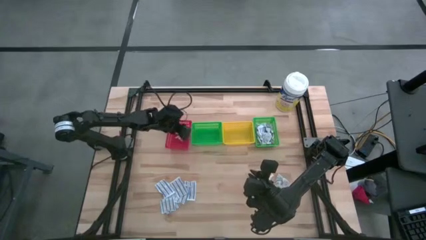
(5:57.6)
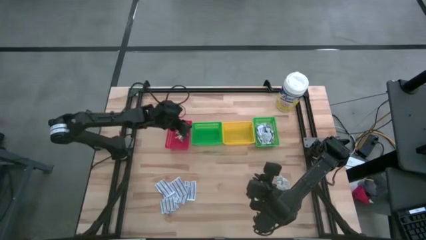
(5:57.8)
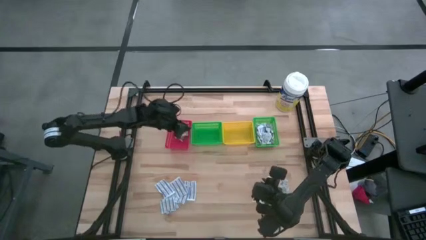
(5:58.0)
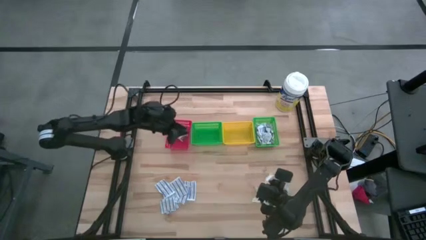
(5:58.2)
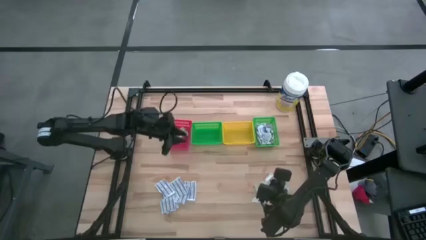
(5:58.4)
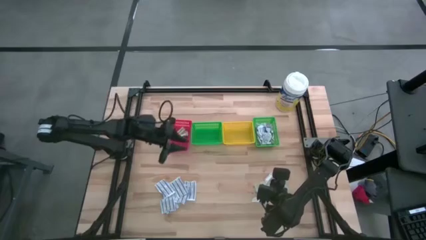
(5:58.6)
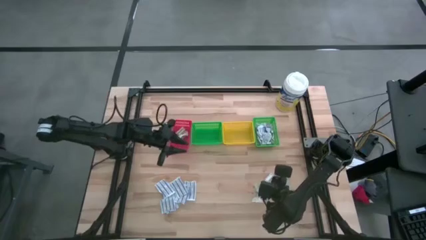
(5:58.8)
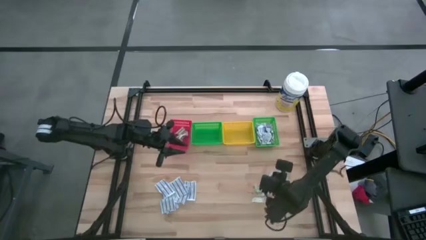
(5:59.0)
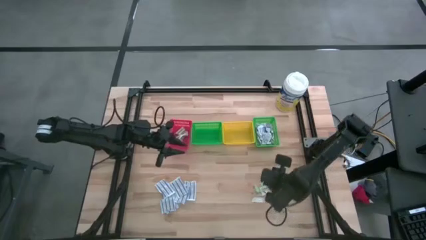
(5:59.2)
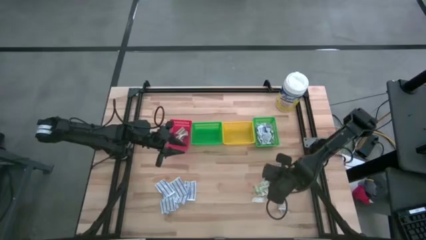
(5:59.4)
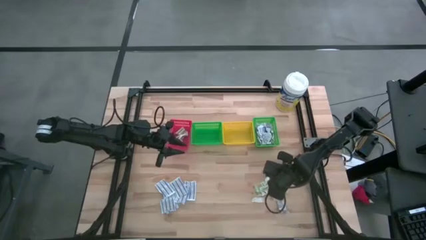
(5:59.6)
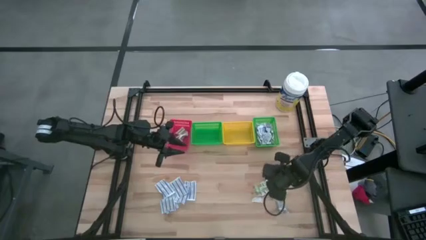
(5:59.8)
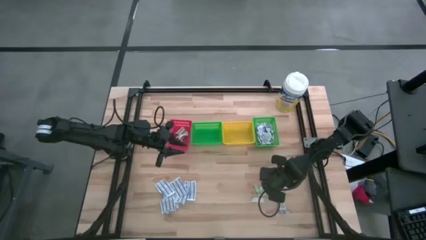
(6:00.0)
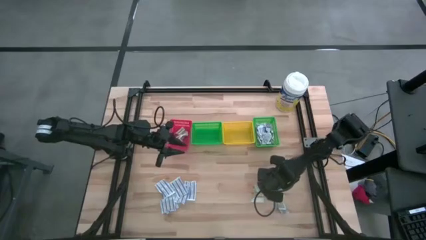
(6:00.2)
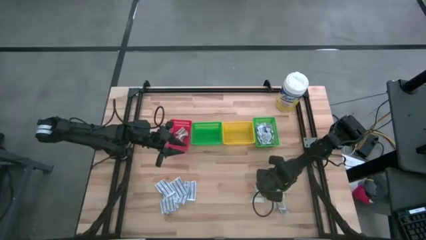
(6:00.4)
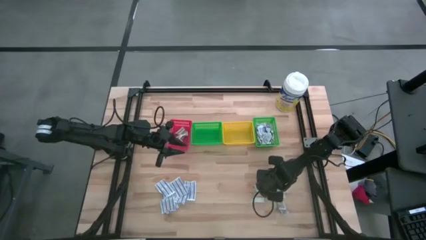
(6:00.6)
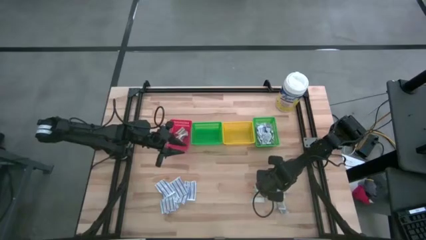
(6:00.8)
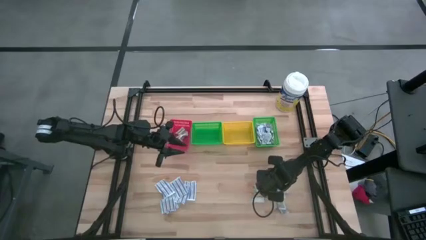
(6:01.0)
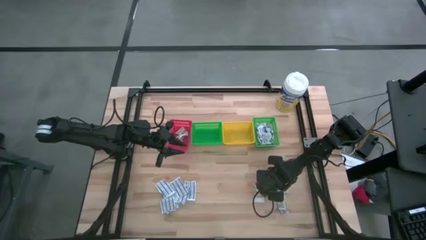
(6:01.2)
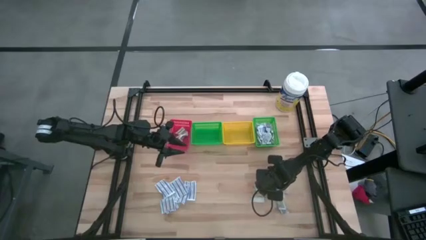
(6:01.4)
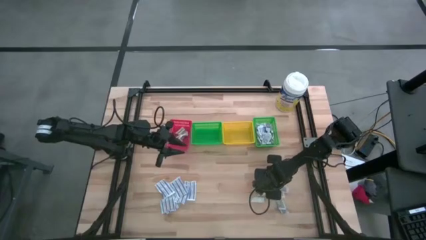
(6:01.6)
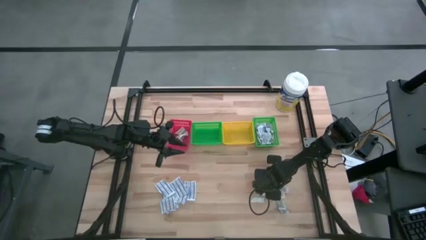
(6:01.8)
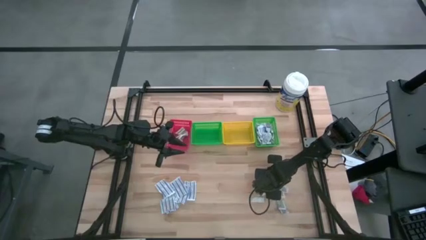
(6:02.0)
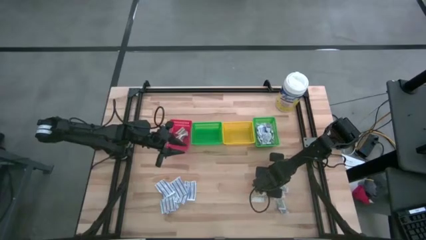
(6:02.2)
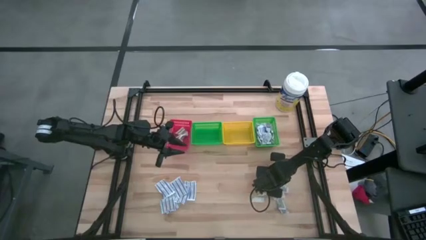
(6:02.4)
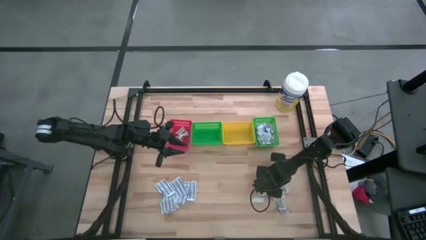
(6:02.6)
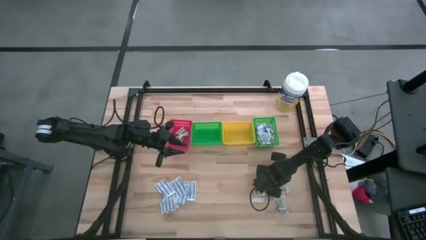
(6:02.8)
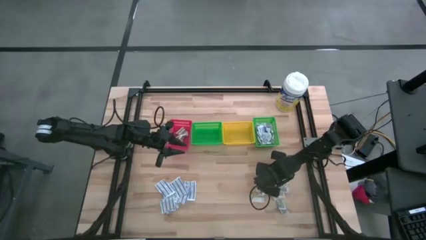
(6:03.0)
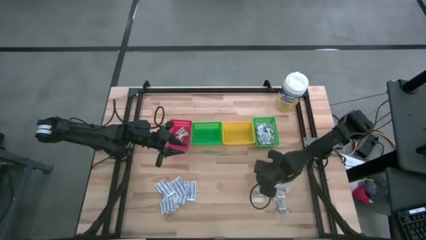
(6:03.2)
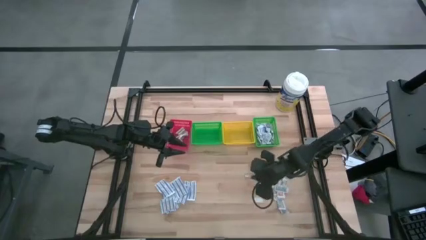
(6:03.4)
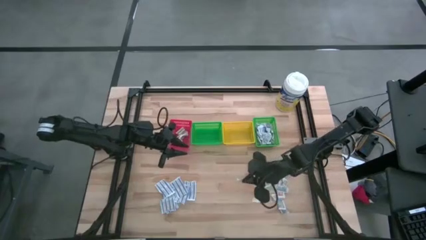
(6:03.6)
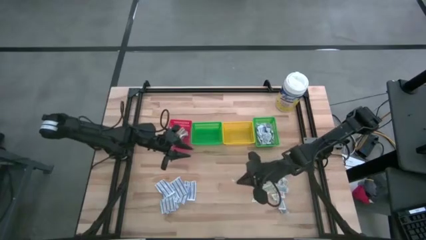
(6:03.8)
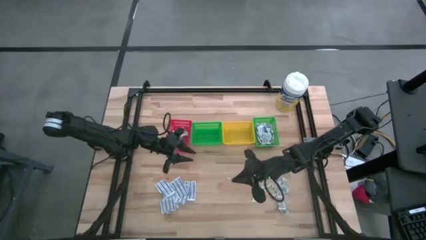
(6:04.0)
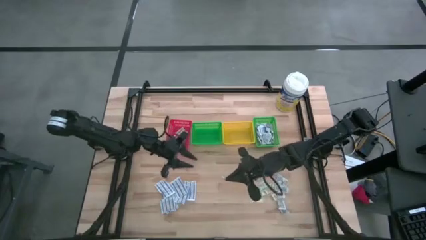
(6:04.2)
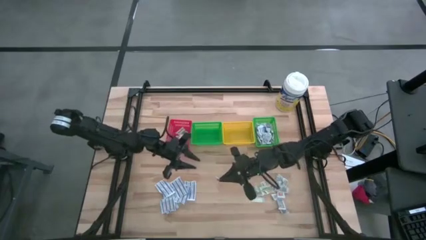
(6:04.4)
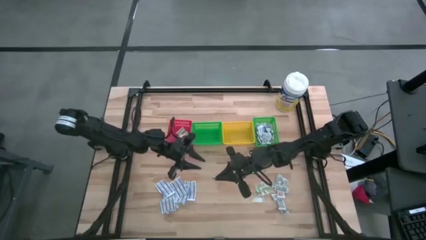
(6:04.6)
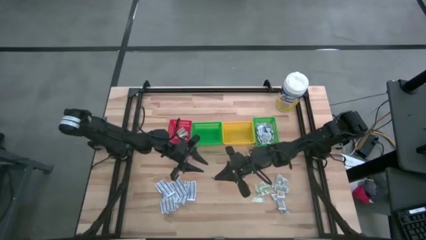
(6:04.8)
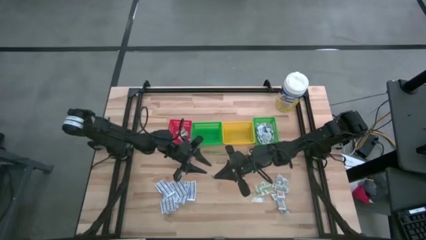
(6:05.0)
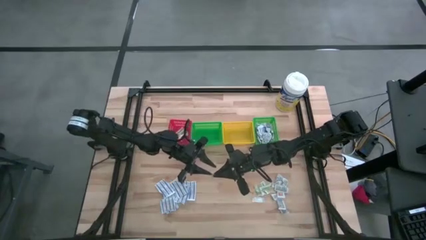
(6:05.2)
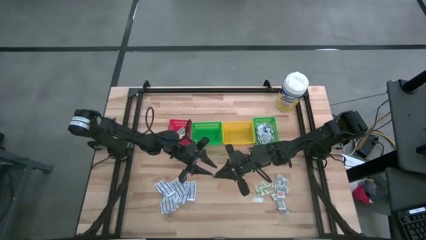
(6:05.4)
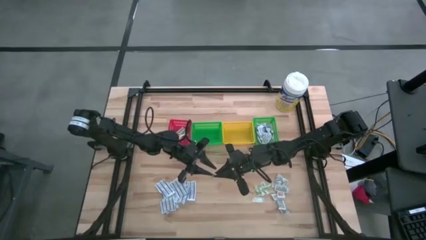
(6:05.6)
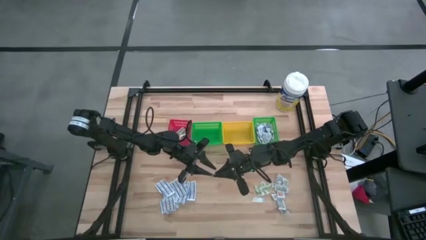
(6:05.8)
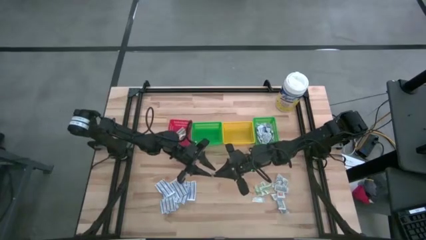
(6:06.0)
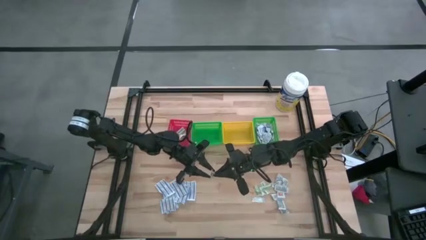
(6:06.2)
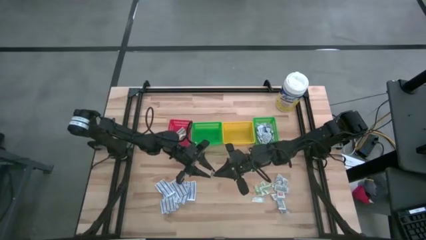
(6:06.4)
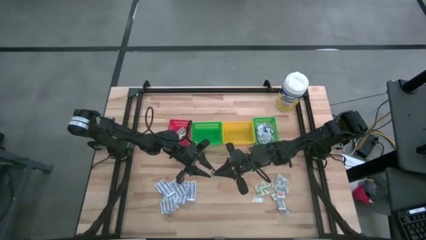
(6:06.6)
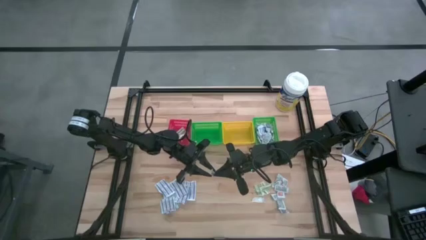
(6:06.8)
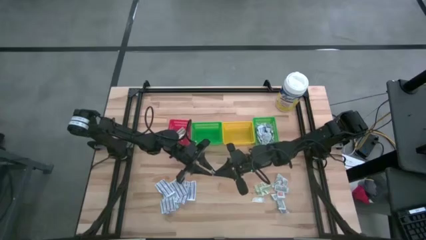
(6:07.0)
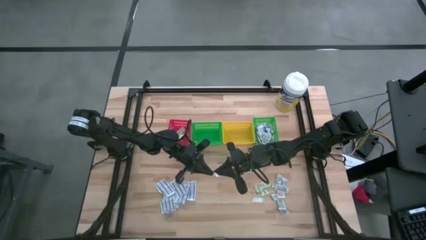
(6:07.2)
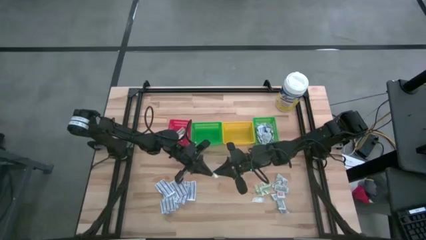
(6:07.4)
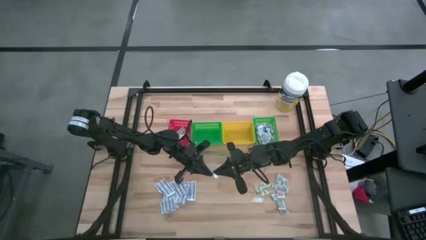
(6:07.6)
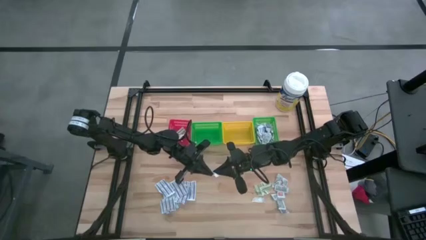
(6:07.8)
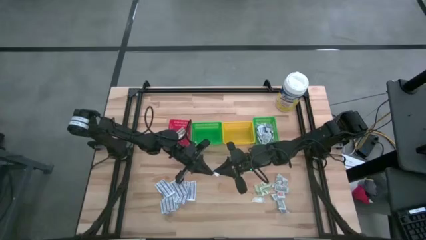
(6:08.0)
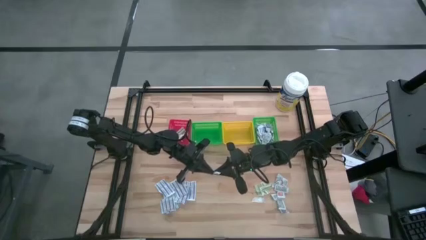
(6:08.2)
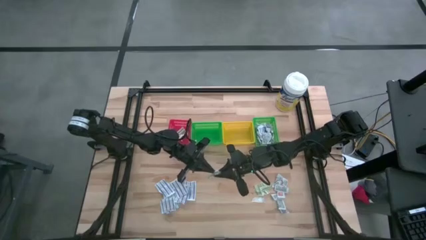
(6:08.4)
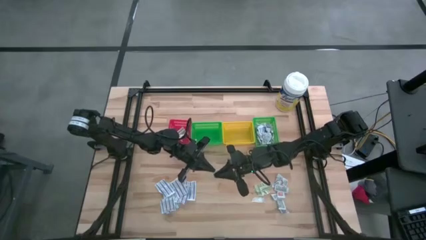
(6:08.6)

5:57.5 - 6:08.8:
Task: Pick & Place First Aid Supplies
Put the green bandage into the red bin

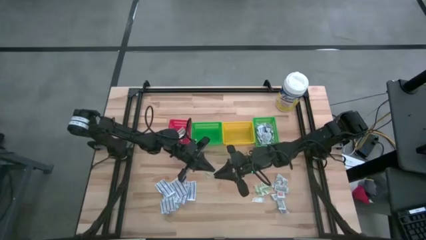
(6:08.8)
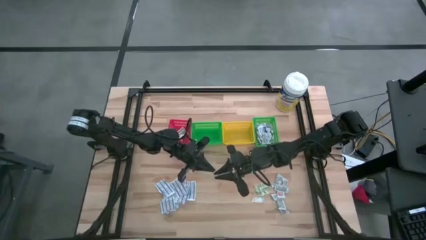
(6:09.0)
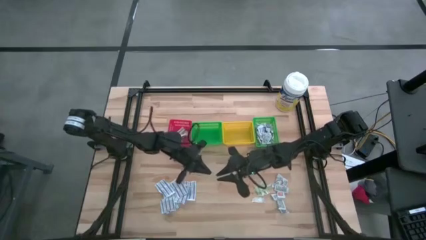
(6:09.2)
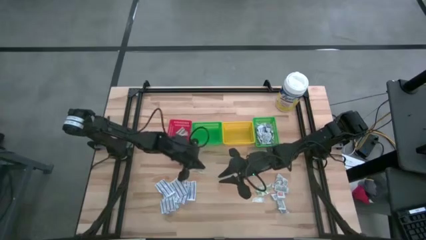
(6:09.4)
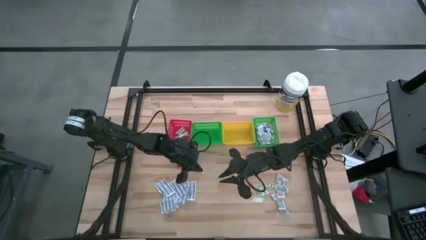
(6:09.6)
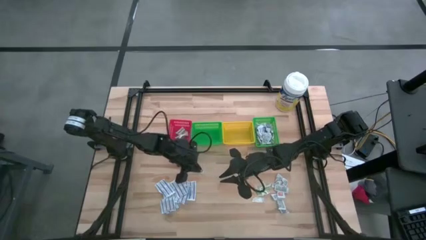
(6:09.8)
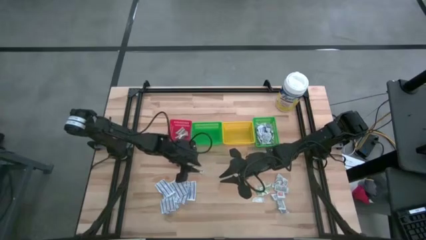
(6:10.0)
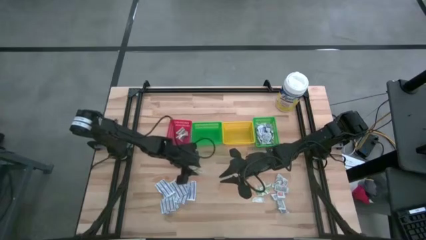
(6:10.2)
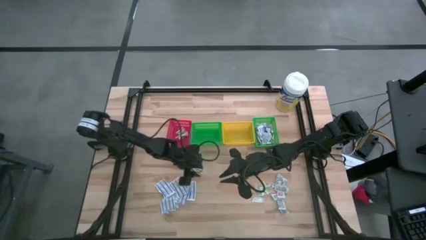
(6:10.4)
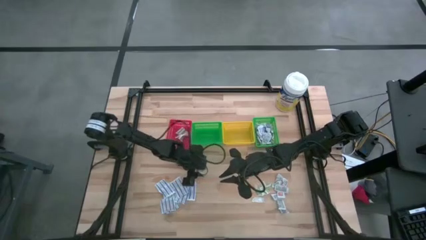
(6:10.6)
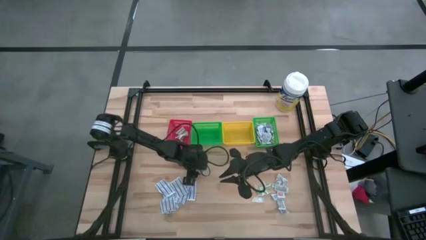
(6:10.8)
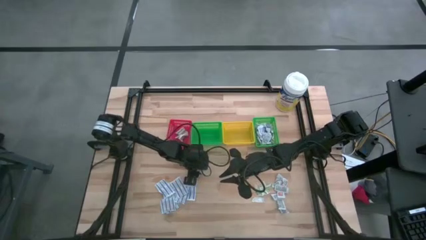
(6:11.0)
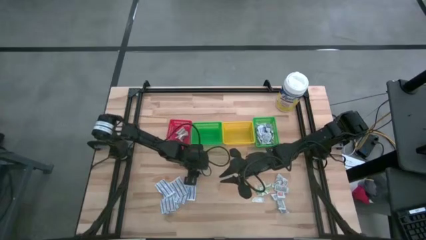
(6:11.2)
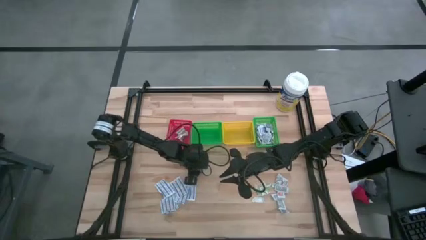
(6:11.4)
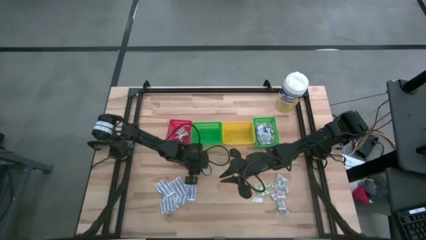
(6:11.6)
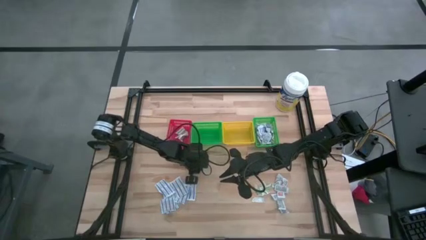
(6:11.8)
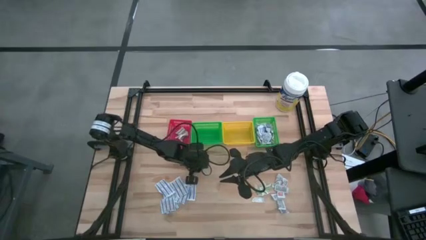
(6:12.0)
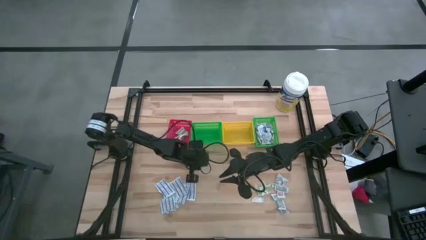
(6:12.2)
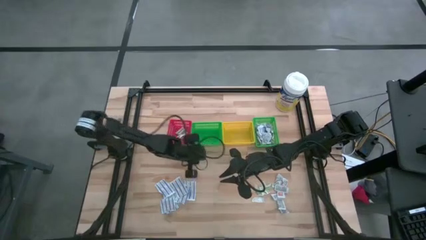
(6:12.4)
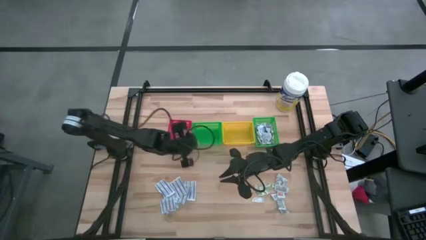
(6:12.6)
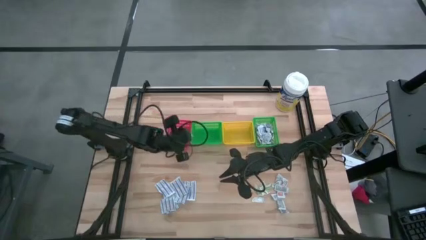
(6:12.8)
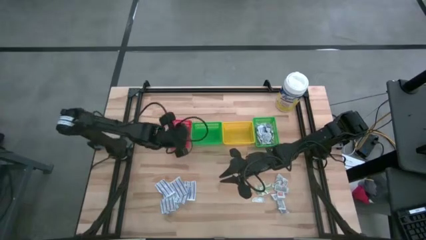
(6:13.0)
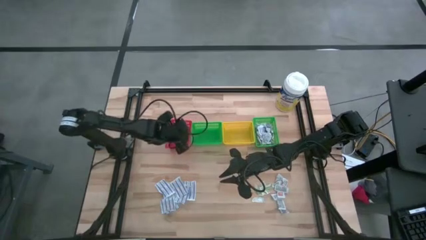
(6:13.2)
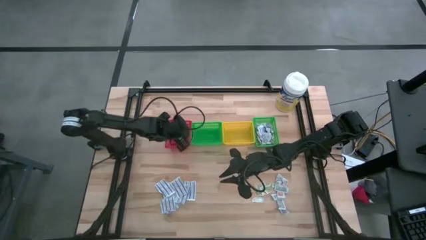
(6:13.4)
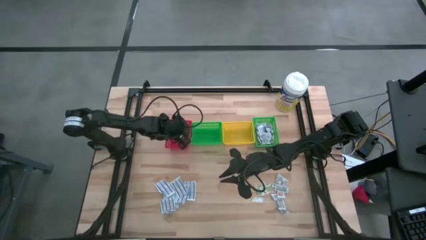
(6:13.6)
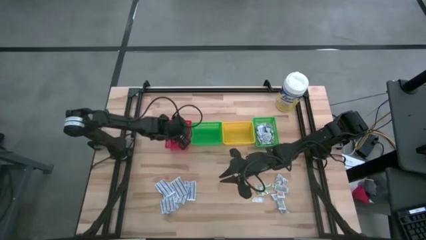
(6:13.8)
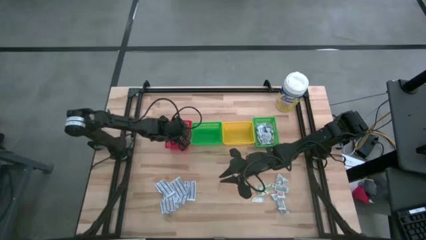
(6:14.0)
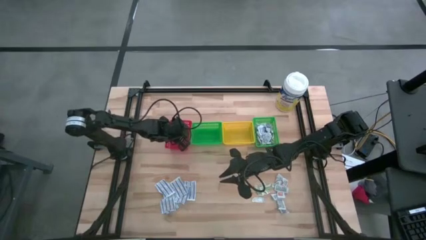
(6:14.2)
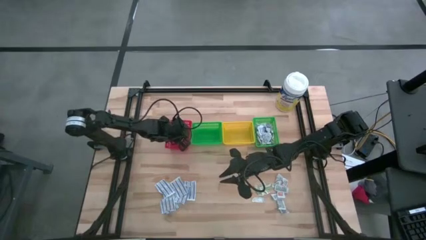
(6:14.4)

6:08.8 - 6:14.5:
Put the green bandage into the red bin
